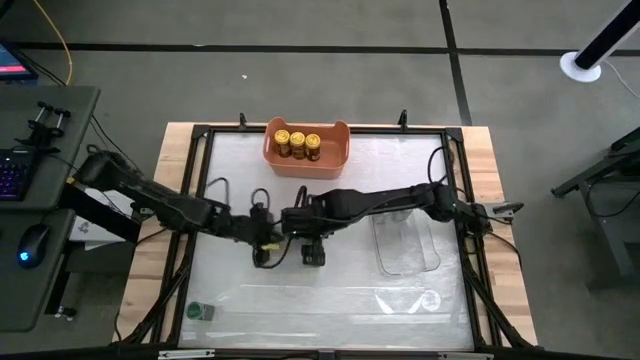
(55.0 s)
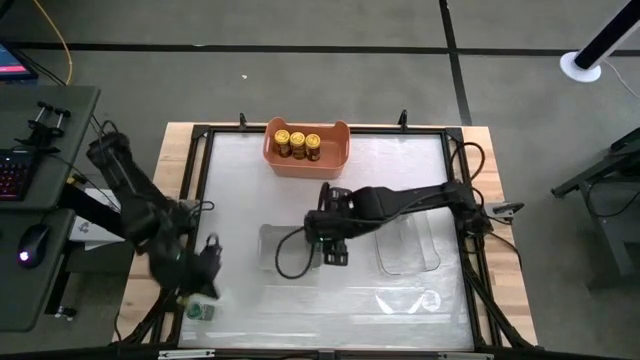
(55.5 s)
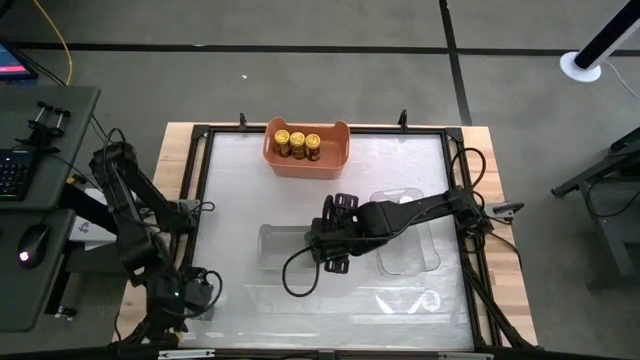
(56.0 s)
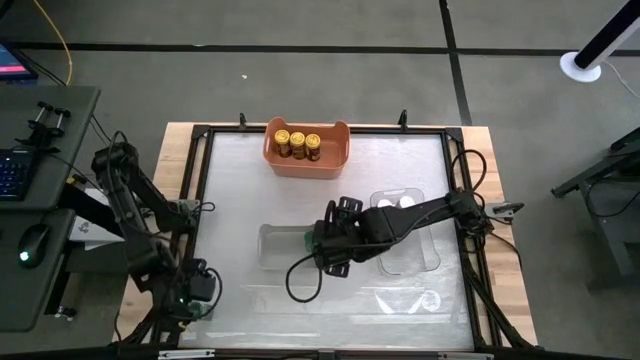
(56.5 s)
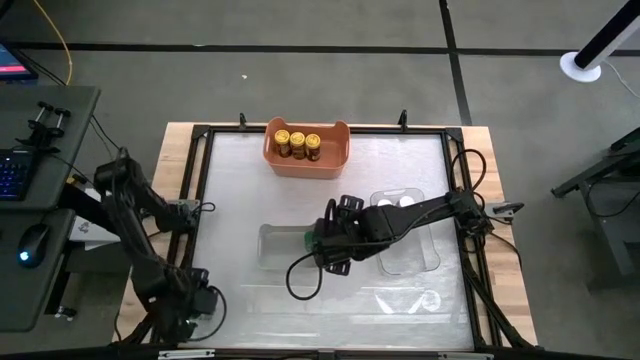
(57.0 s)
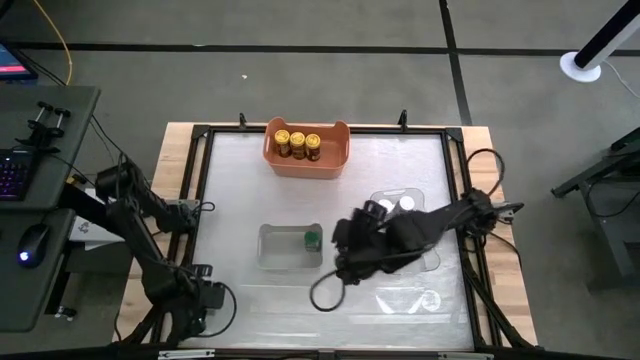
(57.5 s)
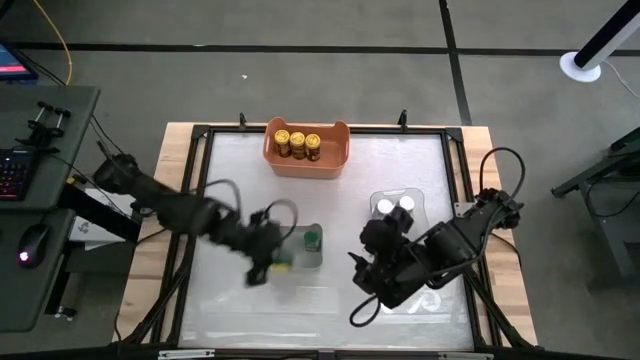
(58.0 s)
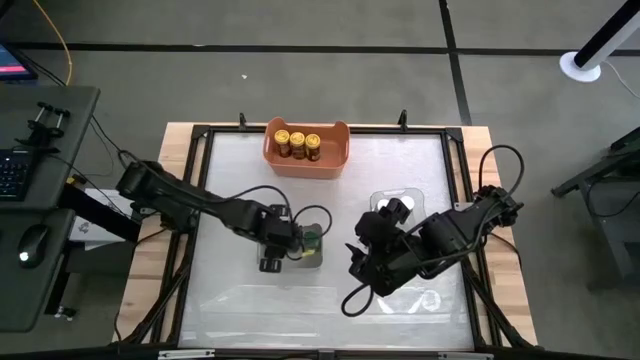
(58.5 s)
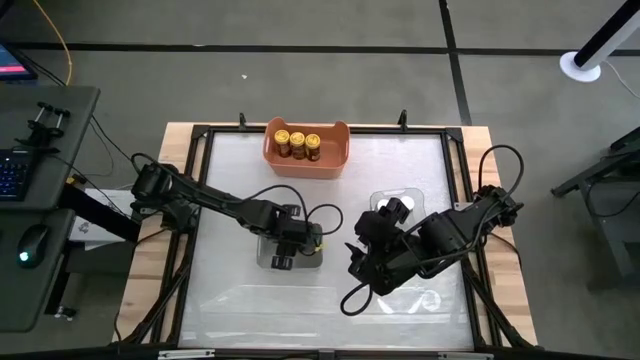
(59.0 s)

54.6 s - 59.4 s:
Task: Sort spices by type
Put the green seasoning bottle into the gray bin

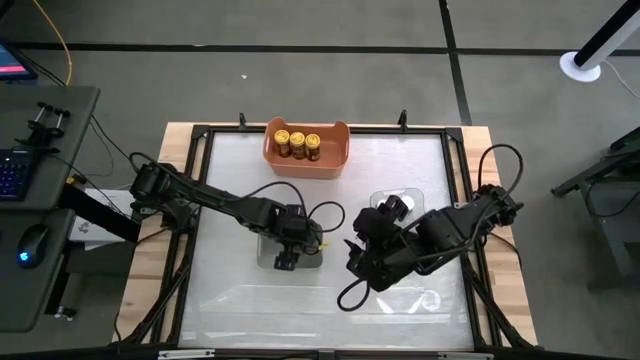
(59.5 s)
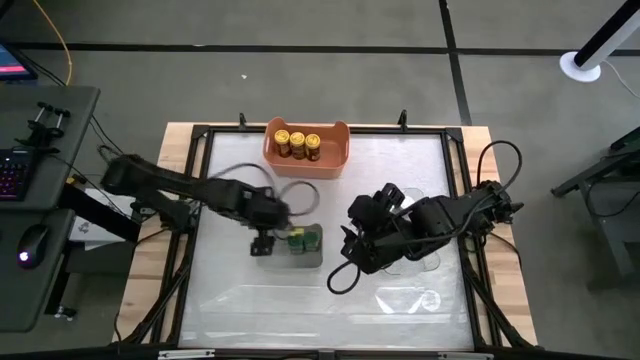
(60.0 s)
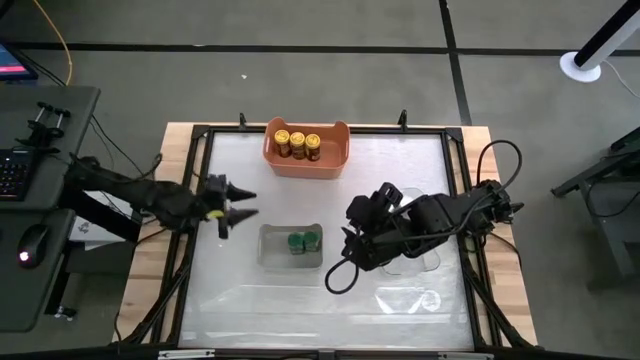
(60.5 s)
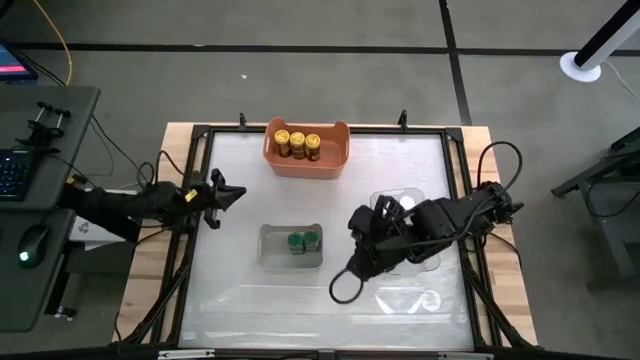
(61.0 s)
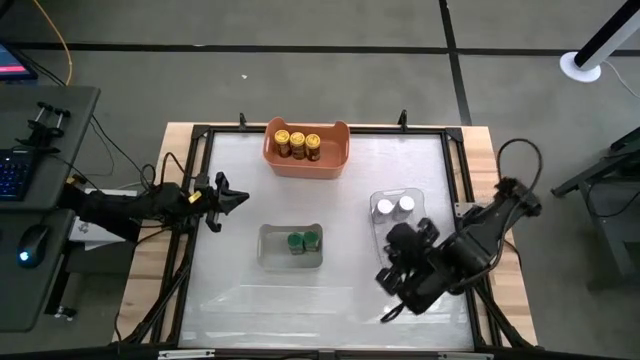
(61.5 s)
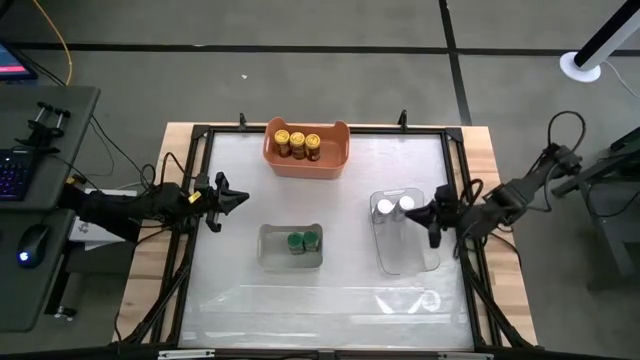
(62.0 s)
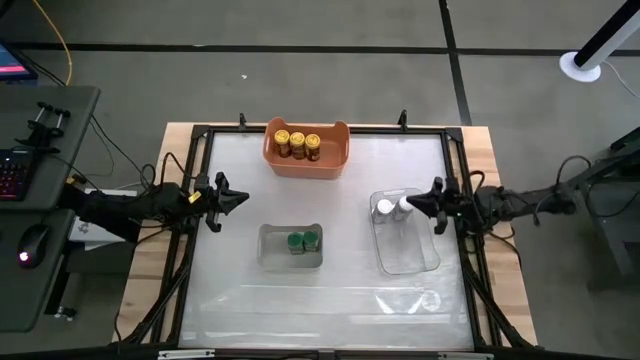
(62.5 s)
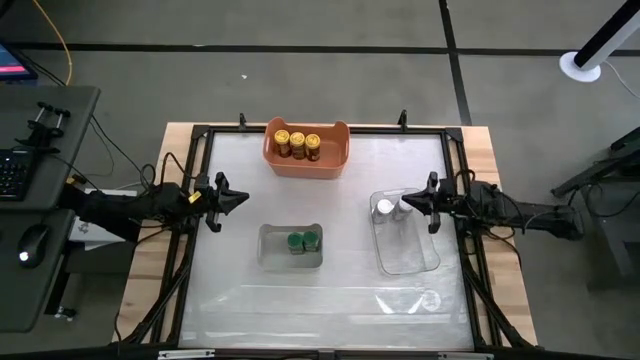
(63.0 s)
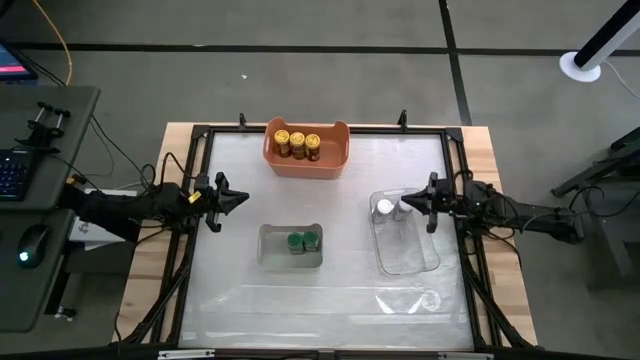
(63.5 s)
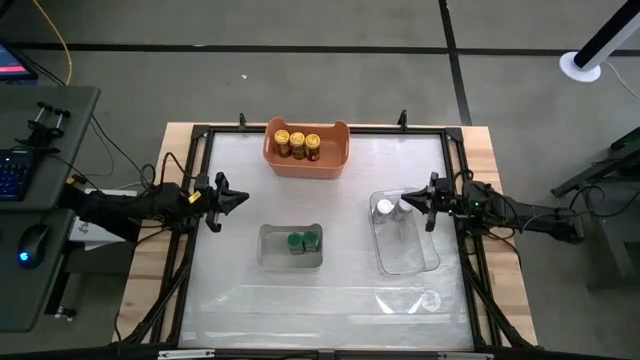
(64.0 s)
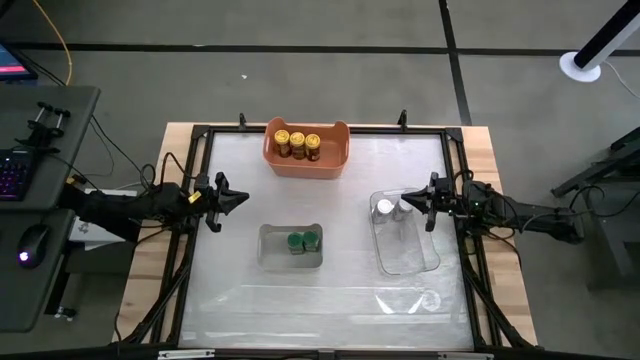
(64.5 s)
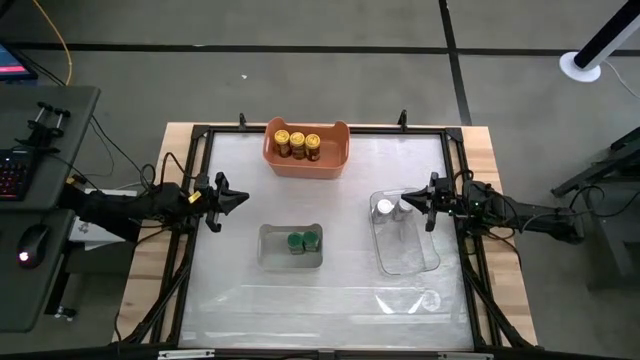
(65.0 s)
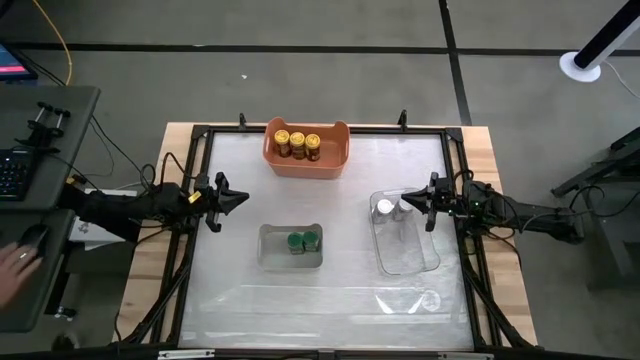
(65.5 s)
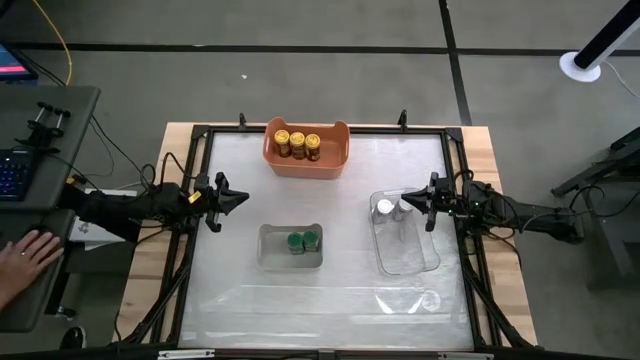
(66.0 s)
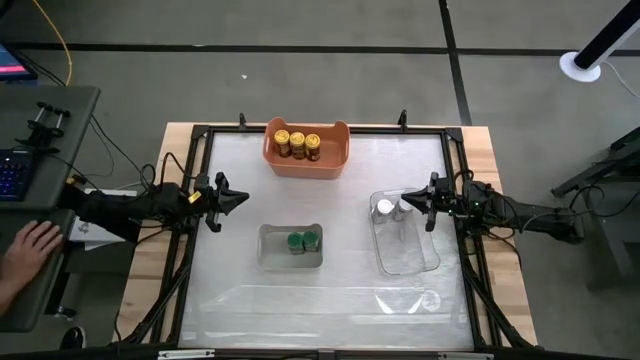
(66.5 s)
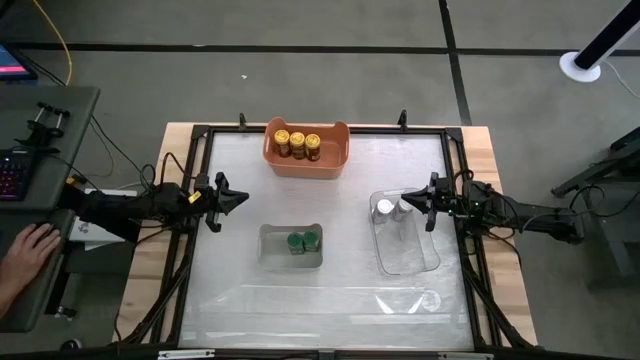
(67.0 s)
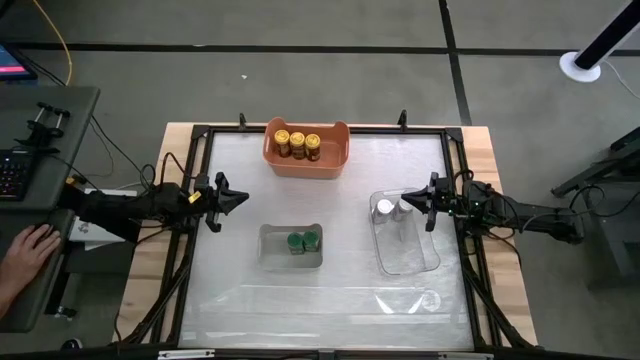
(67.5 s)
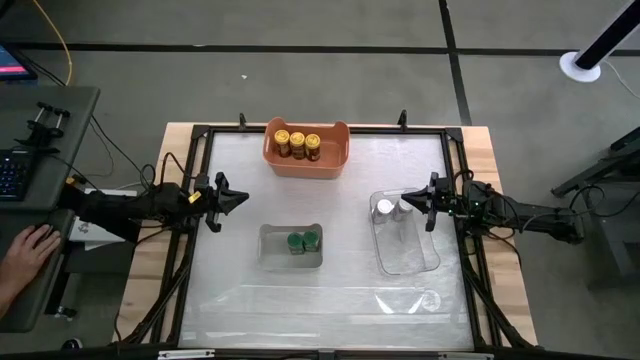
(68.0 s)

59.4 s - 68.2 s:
Return to Home Position

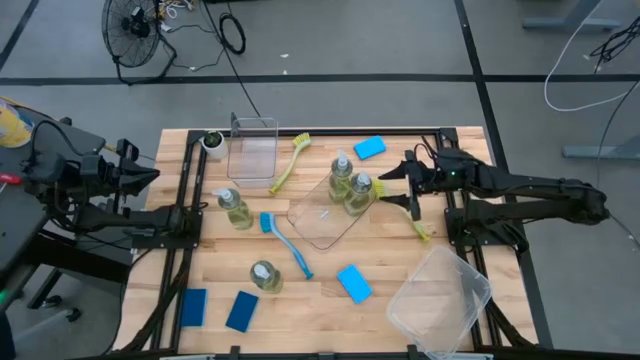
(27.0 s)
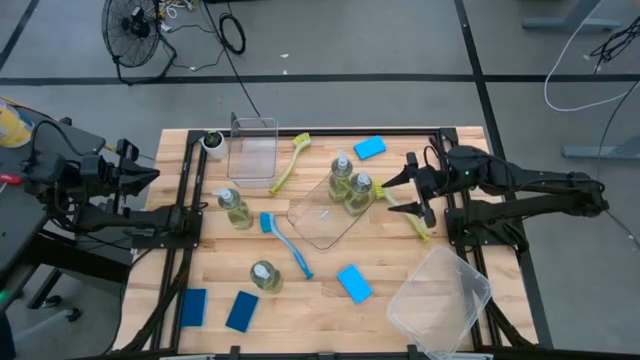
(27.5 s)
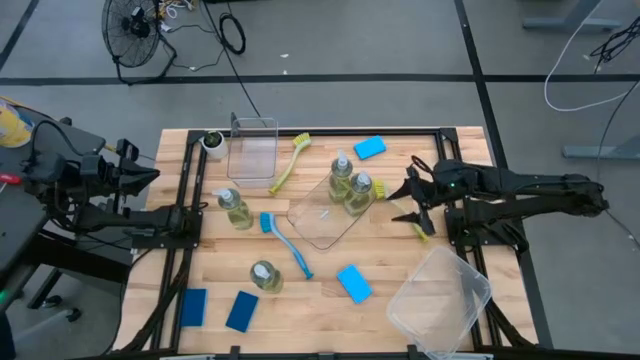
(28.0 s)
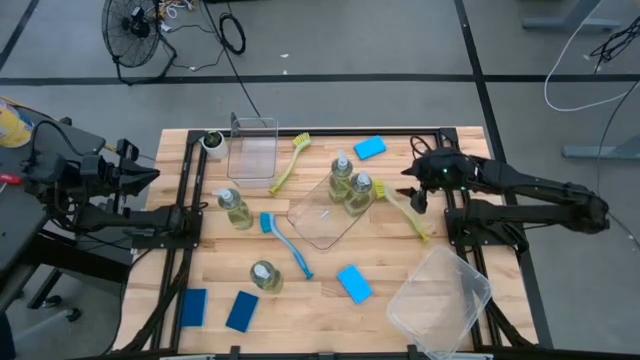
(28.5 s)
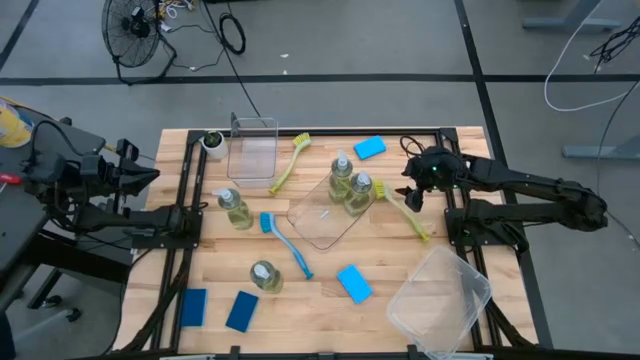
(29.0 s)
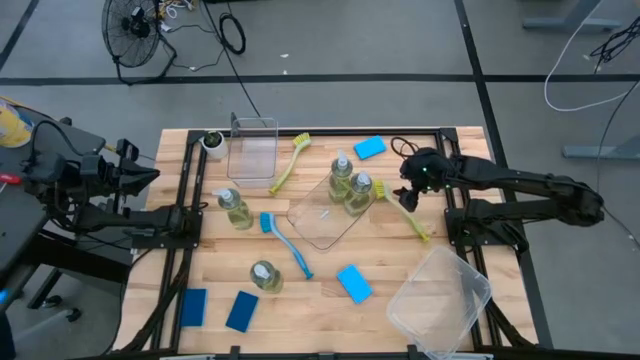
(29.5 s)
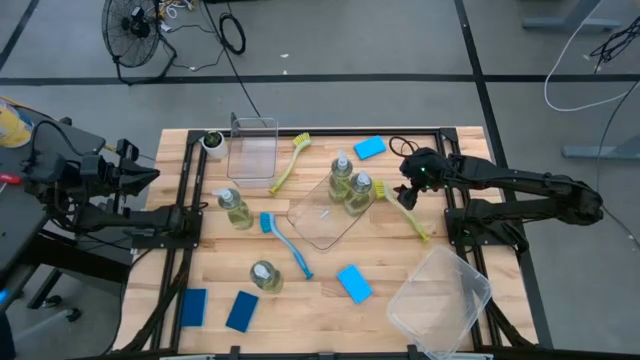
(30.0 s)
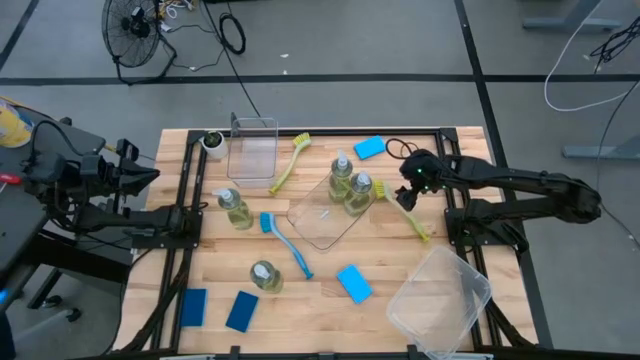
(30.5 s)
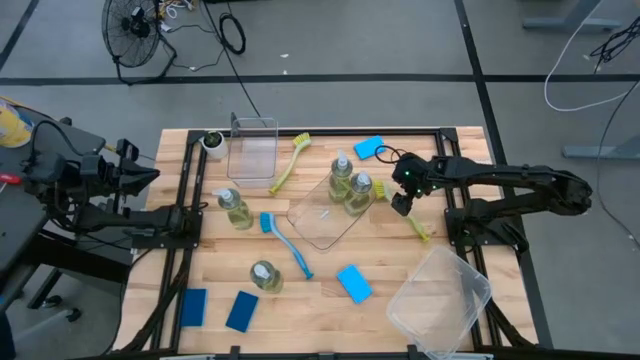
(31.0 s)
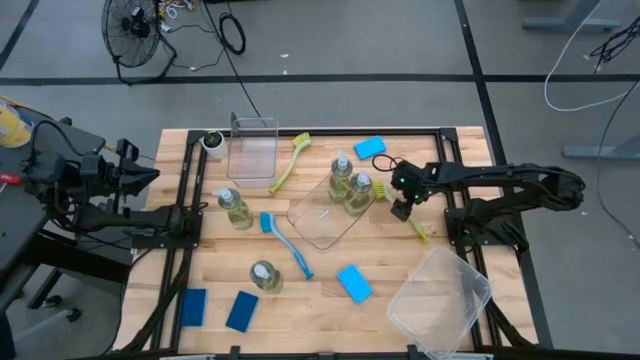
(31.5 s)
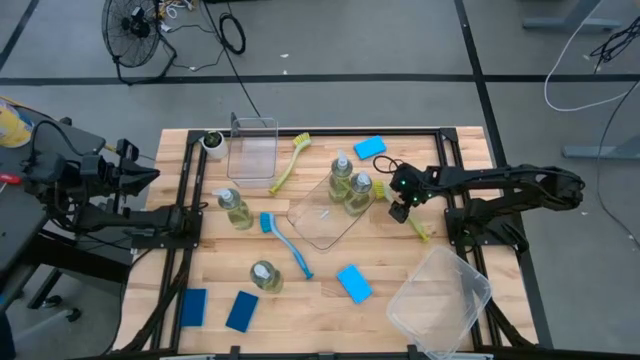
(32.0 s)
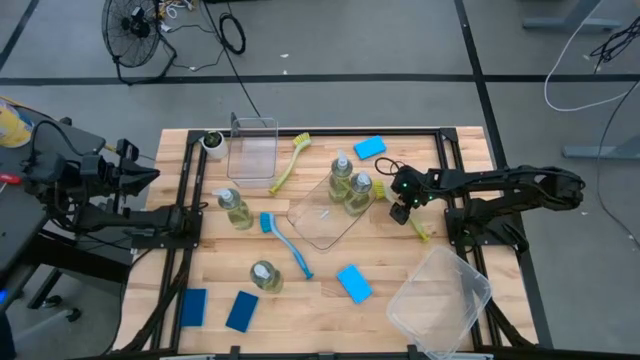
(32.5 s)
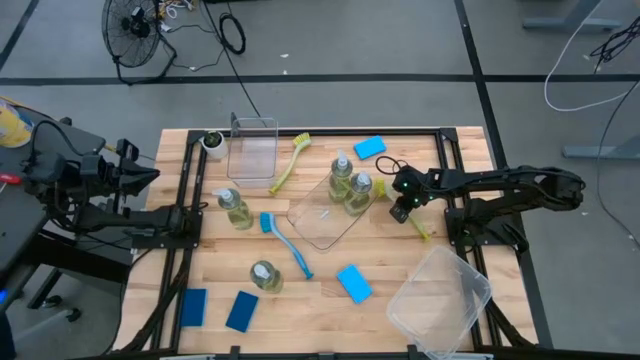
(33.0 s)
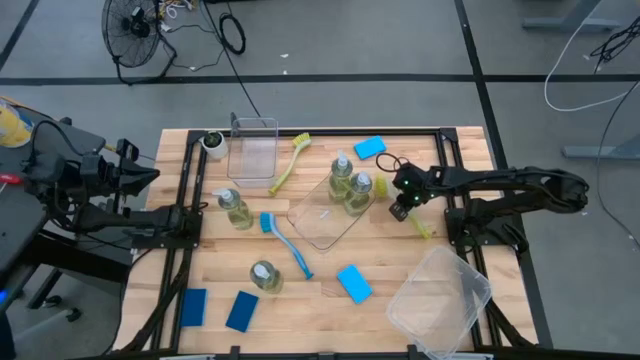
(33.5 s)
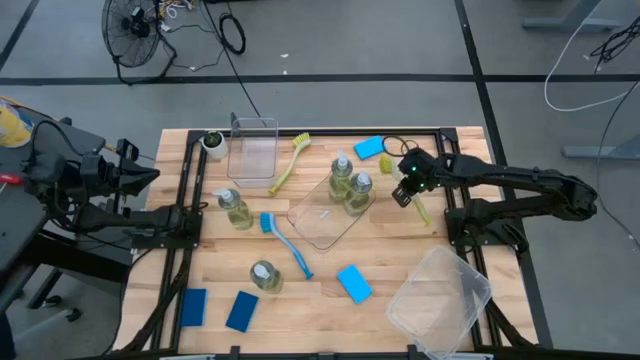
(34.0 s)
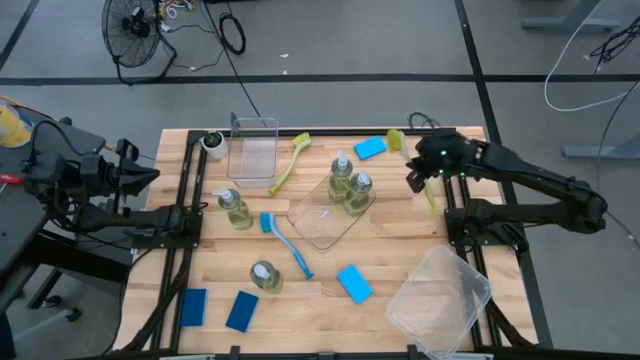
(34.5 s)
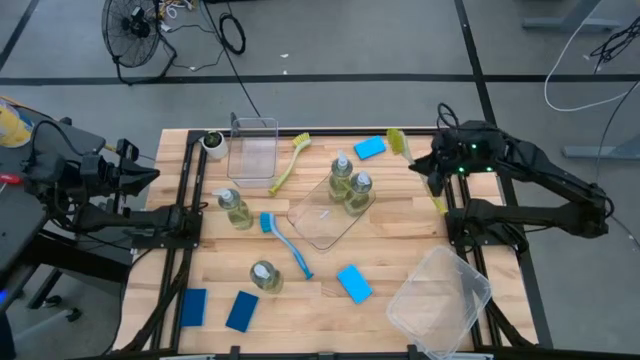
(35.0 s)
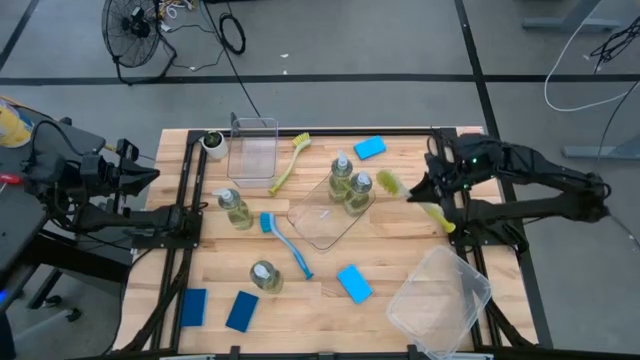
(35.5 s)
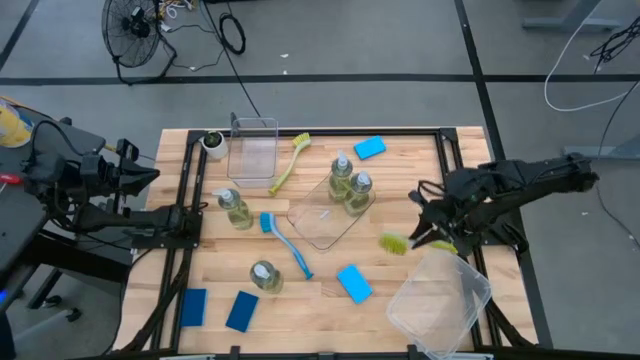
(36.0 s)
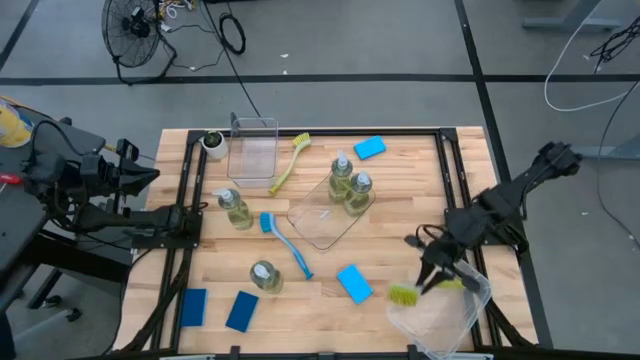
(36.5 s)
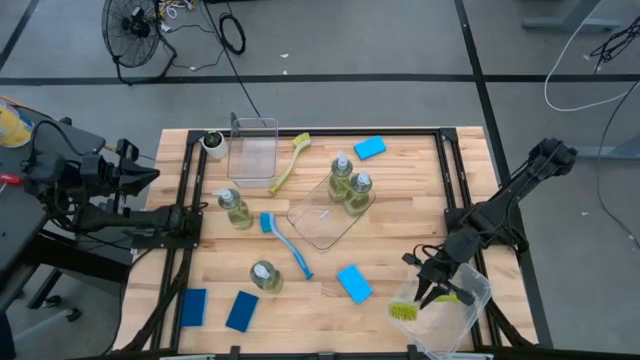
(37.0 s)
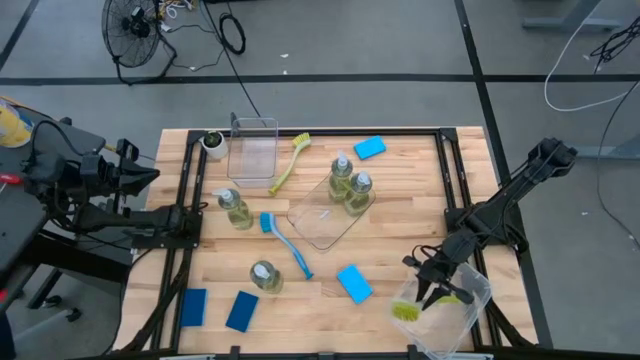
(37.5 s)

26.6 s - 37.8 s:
Task: Pick & Place Kitchen Sink Supplies
Put the yellow toilet brush into the transparent container
